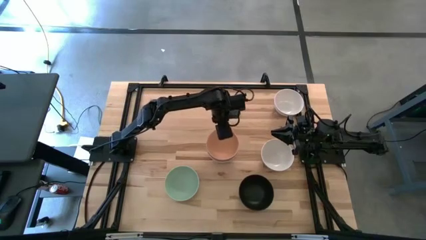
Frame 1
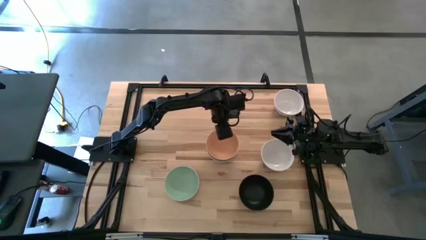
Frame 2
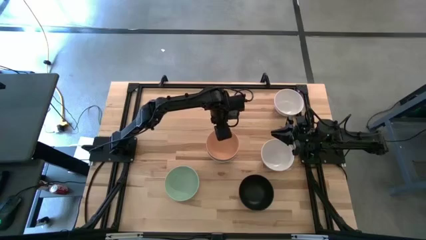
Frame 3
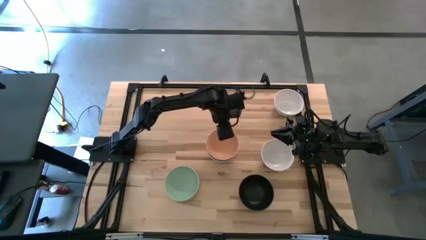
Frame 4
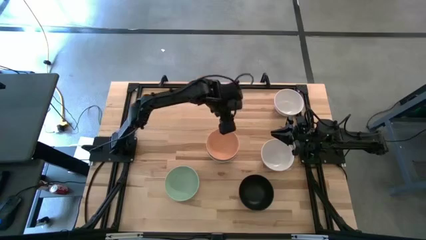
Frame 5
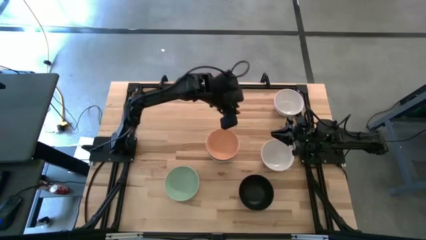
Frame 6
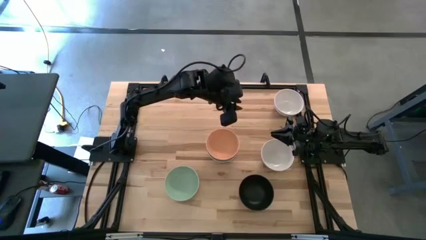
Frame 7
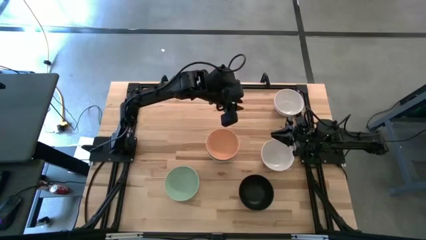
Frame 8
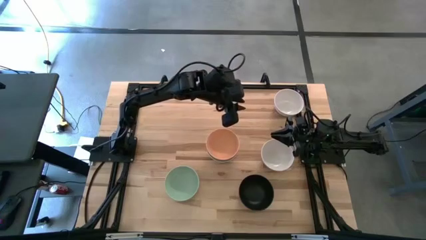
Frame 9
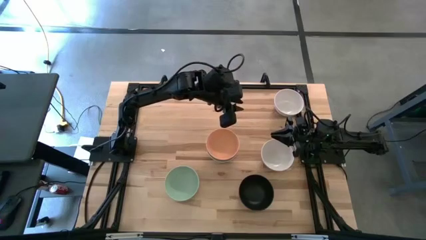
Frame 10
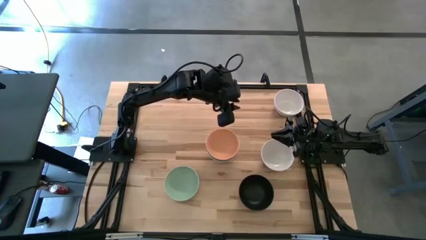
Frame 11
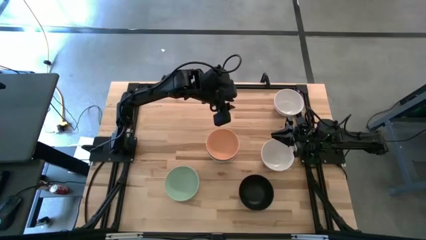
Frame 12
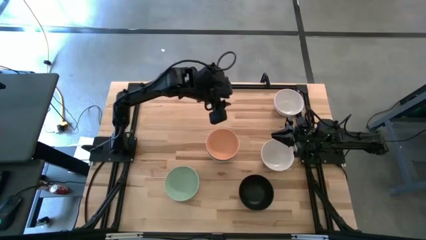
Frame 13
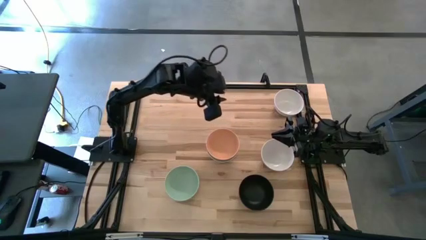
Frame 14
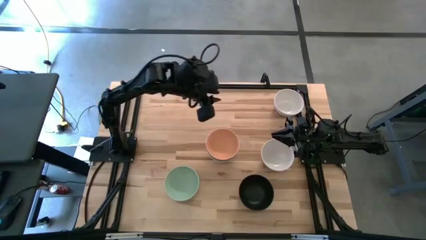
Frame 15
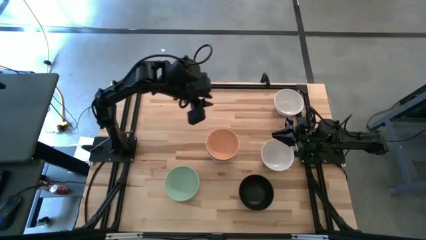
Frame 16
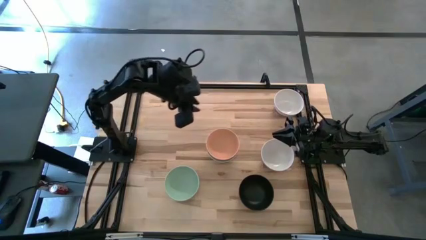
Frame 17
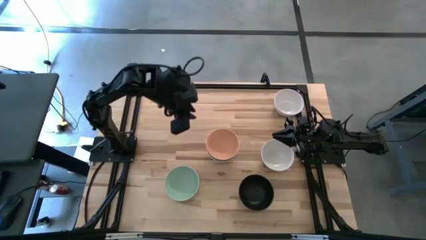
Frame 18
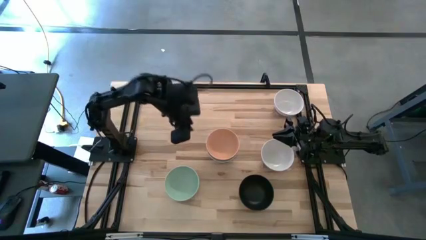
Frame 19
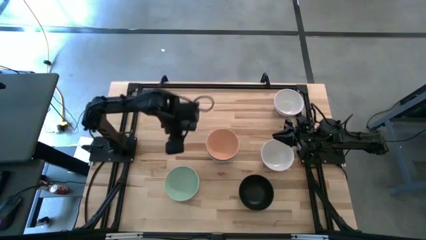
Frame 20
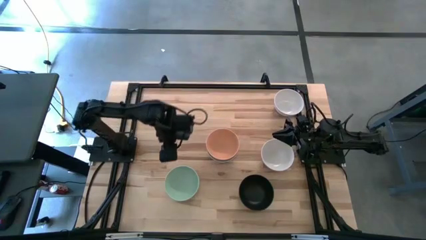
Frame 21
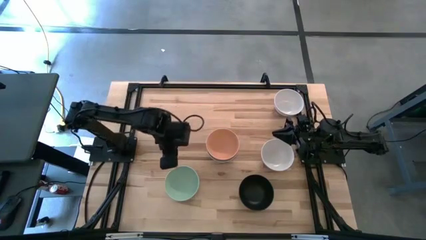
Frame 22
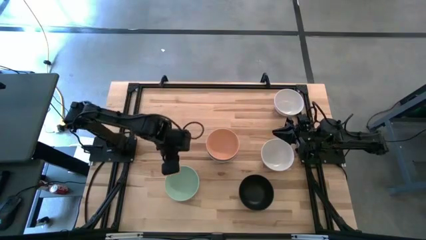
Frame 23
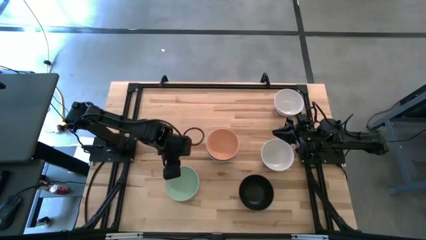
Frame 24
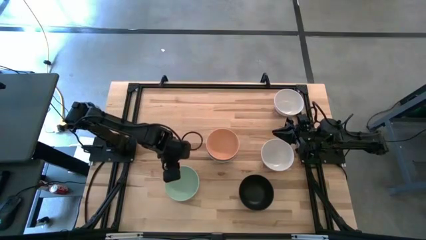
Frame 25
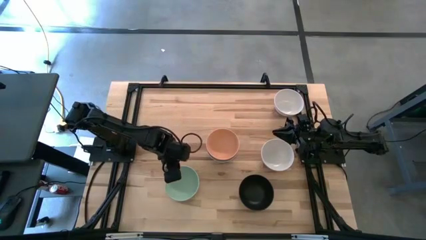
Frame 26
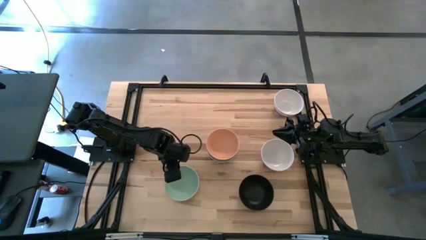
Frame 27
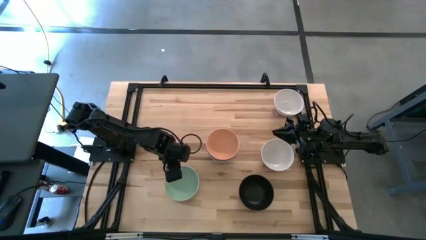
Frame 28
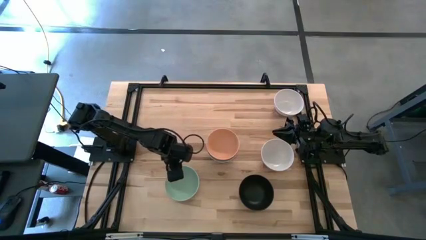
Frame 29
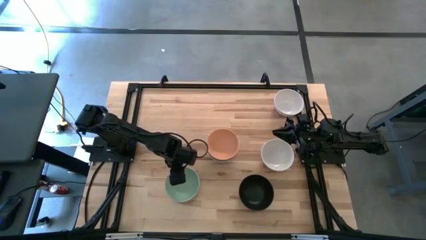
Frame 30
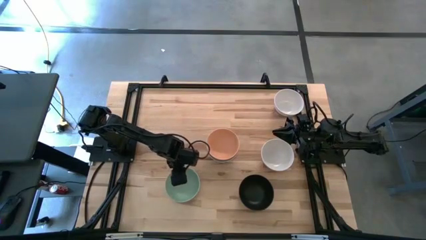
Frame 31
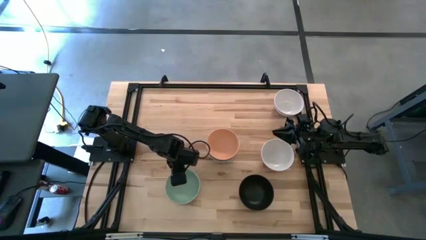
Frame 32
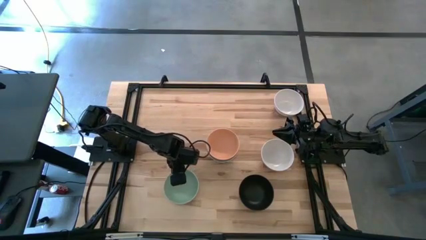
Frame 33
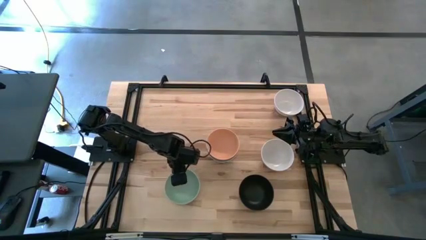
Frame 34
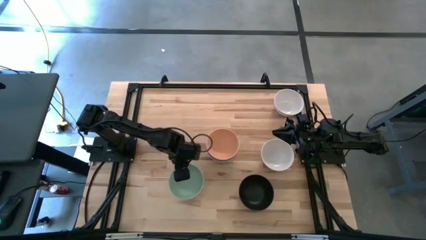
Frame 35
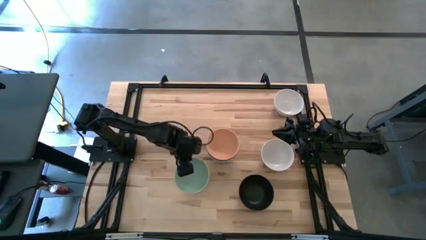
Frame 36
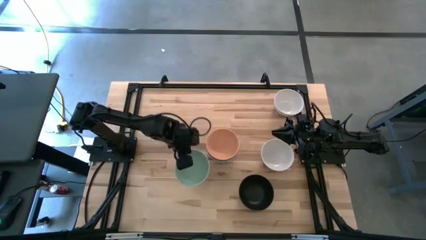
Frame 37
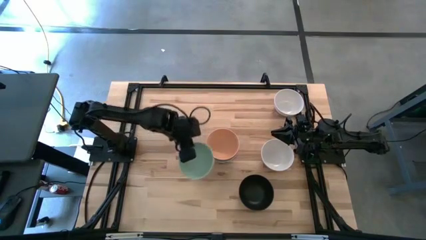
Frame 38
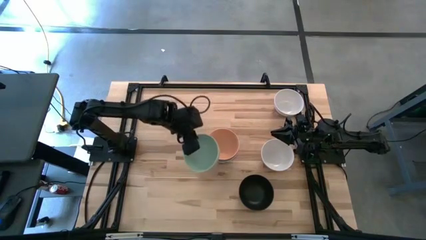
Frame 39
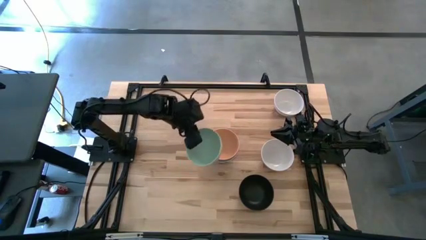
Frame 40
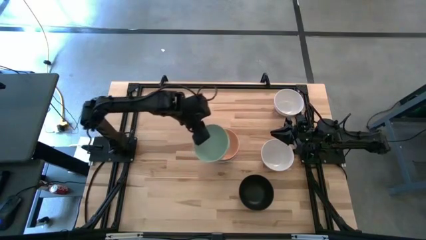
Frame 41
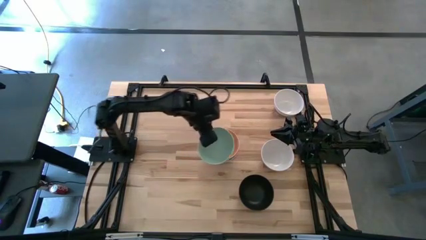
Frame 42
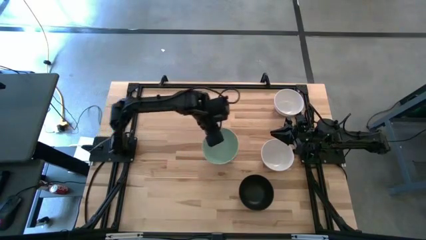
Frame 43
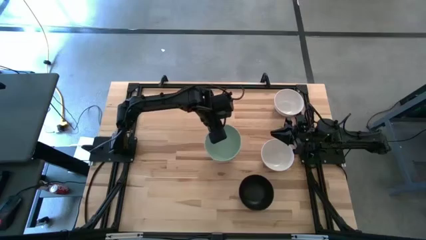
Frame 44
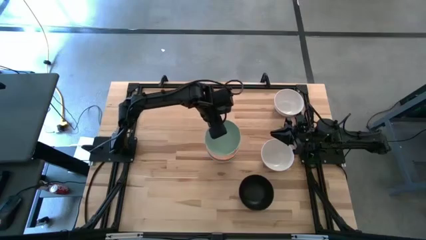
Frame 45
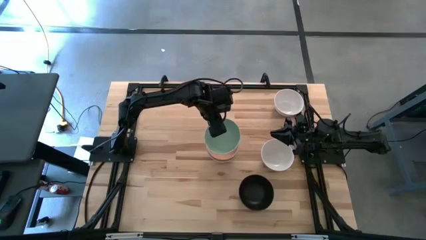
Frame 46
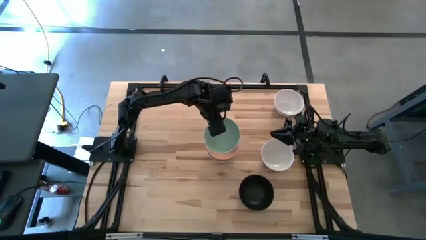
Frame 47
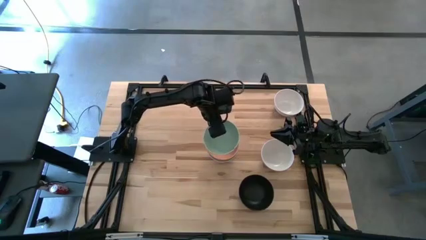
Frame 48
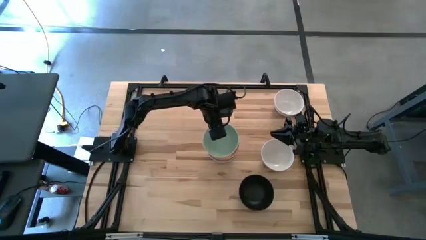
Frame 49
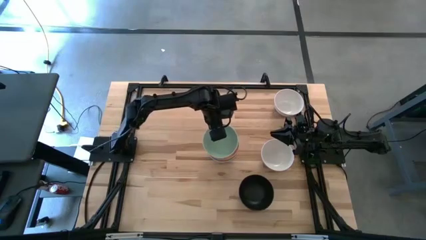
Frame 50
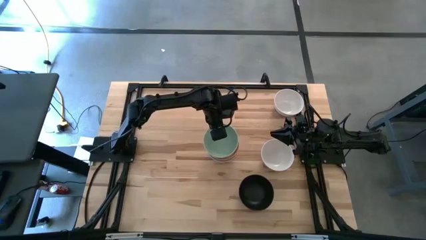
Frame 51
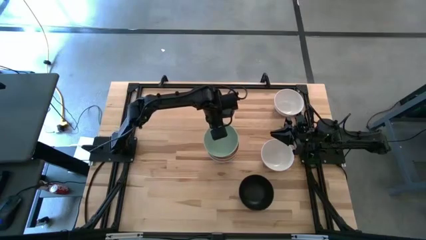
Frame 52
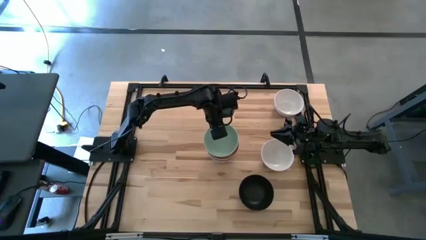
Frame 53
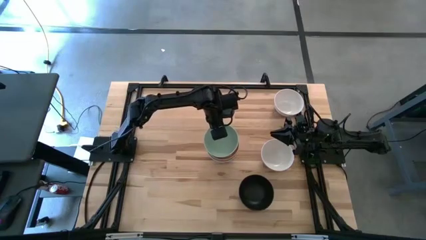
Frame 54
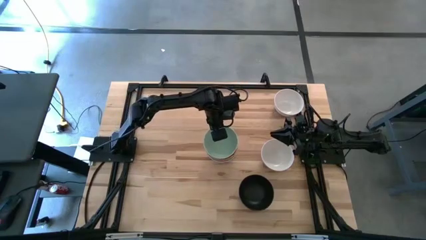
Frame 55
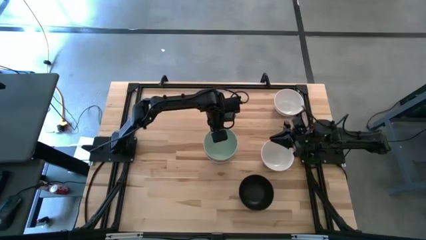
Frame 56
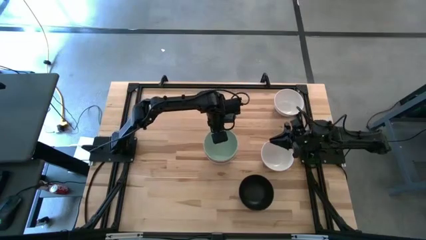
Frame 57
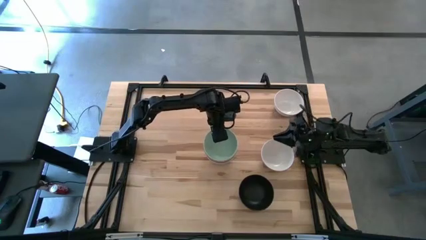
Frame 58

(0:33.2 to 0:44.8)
Task: Nest bowls inside each other
Stack the blue bowl on the orange bowl

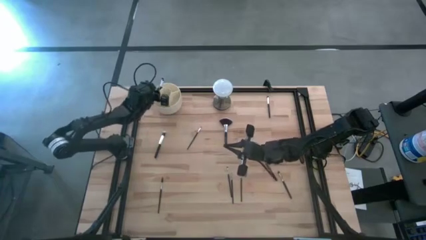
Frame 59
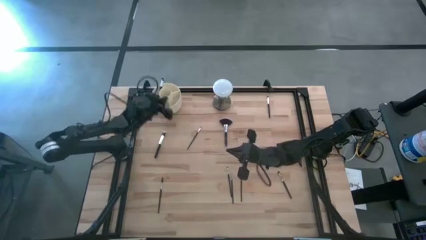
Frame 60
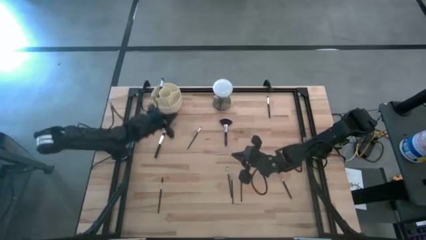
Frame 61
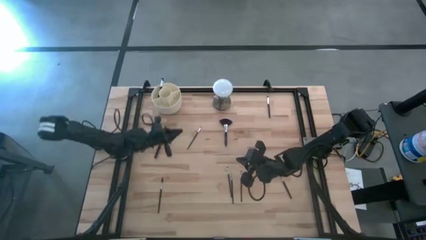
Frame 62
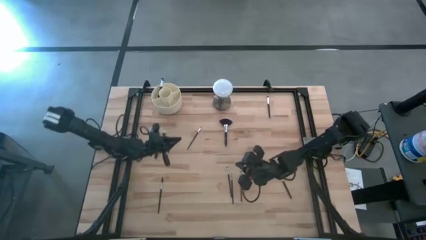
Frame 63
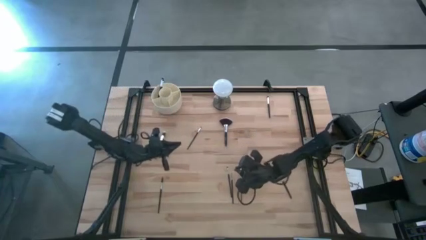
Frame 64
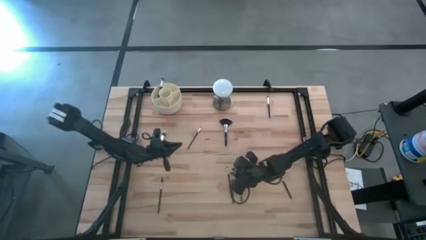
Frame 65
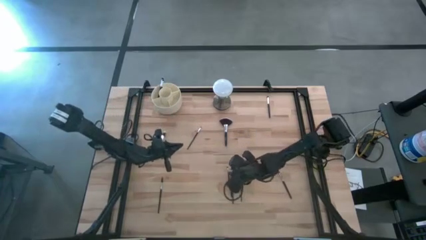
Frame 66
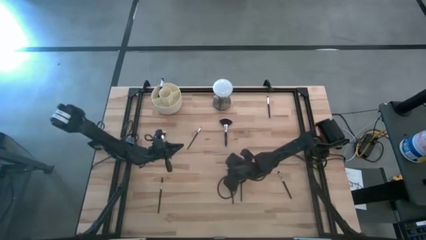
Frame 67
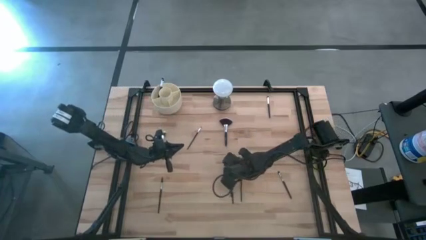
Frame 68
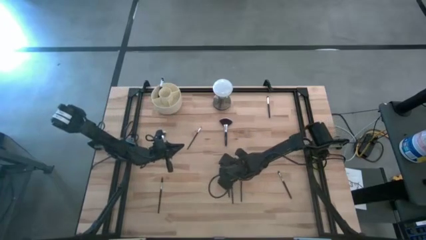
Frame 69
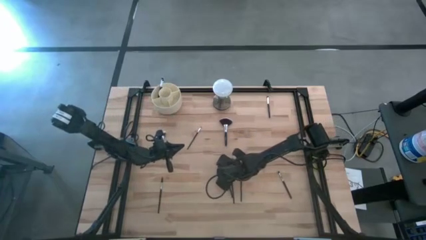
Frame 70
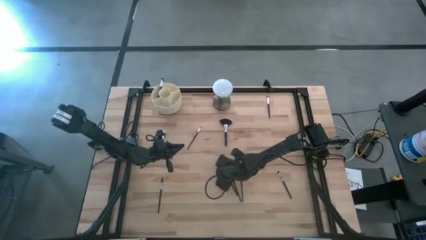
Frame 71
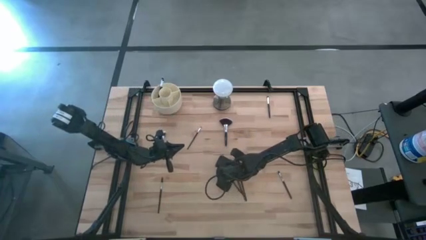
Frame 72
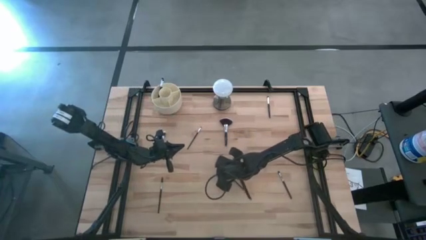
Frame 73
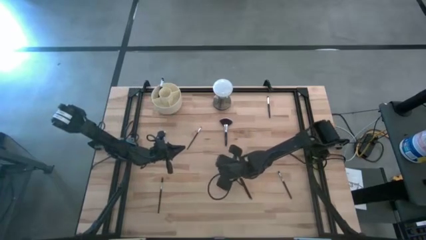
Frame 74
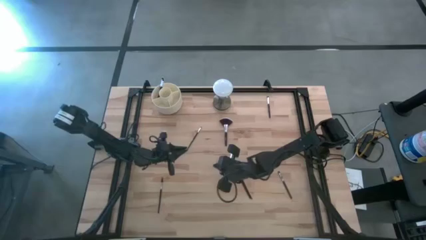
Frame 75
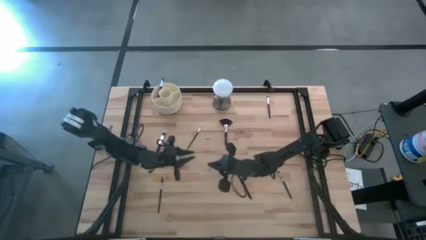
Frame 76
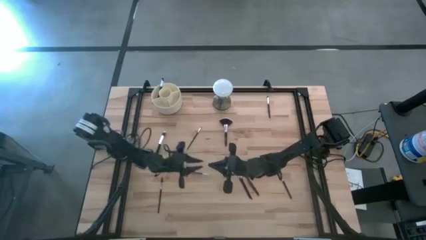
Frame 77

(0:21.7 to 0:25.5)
Task: Put items in baskets/containers
Put the eyeshadow brush into the organizer
